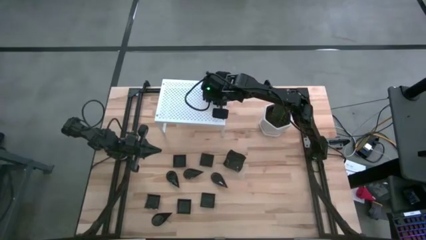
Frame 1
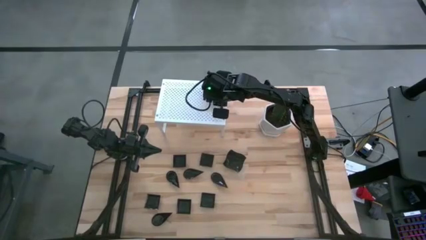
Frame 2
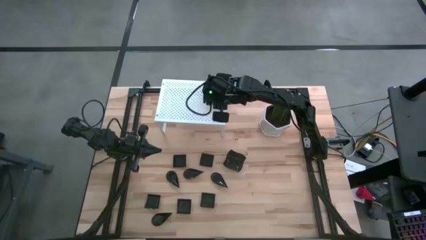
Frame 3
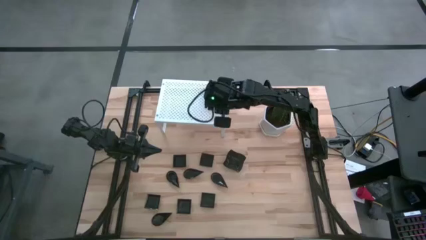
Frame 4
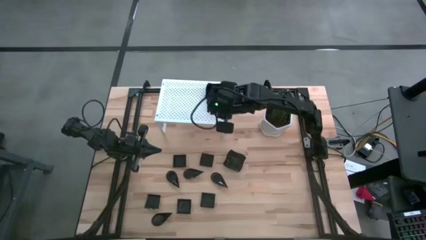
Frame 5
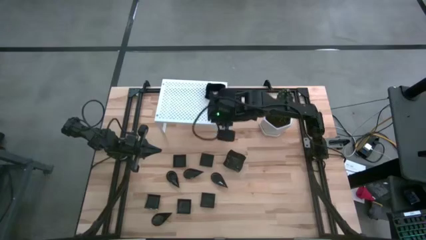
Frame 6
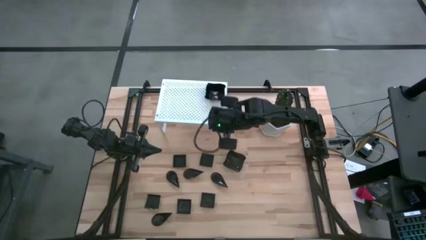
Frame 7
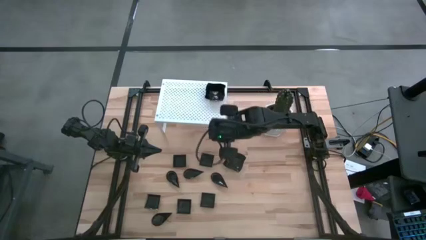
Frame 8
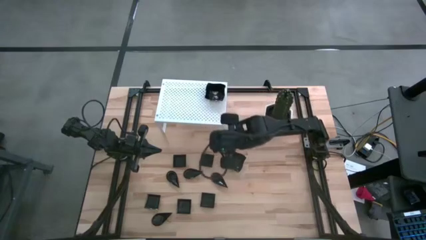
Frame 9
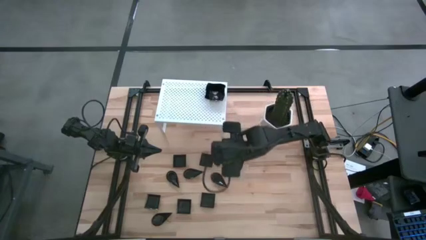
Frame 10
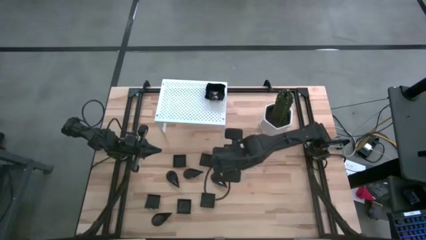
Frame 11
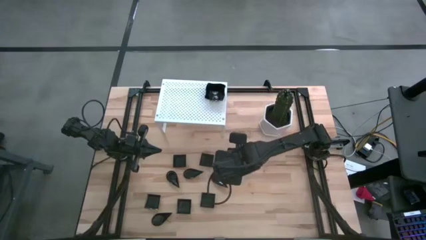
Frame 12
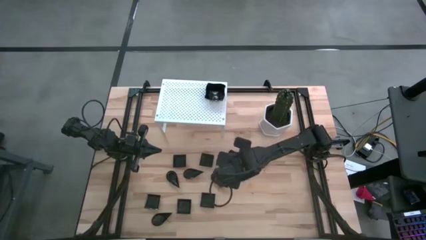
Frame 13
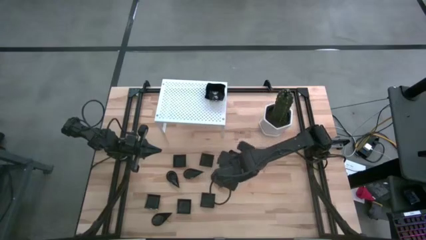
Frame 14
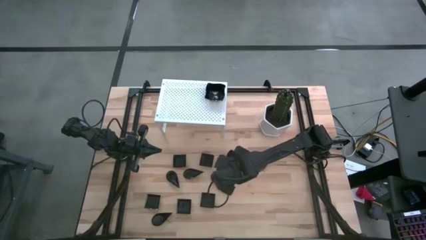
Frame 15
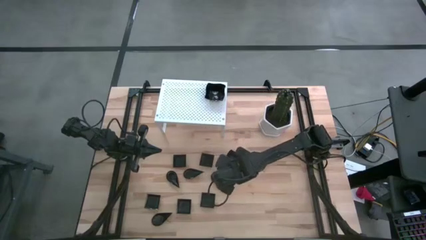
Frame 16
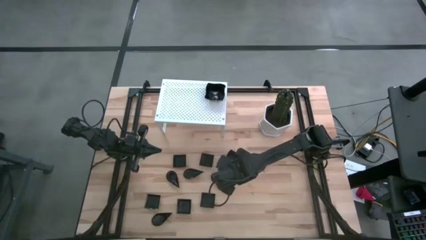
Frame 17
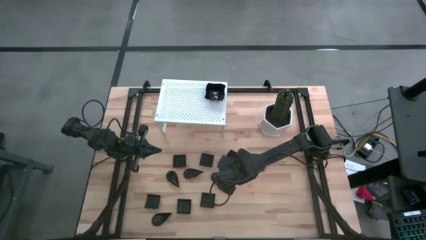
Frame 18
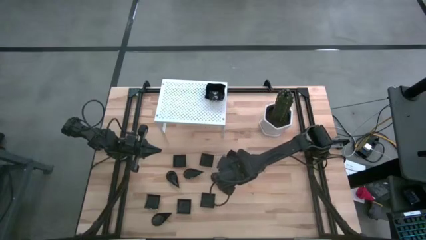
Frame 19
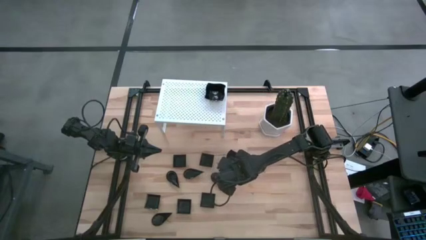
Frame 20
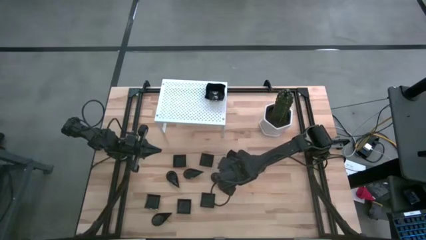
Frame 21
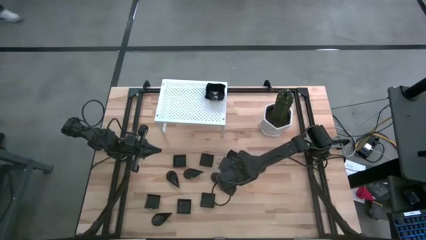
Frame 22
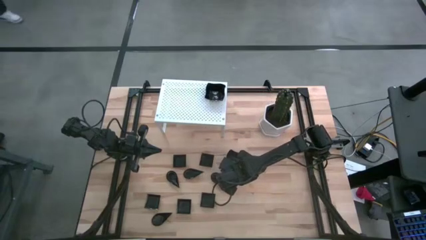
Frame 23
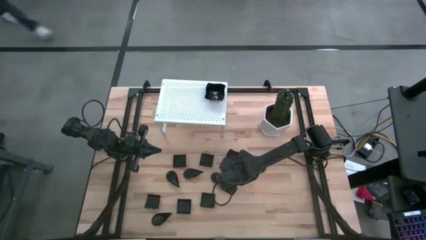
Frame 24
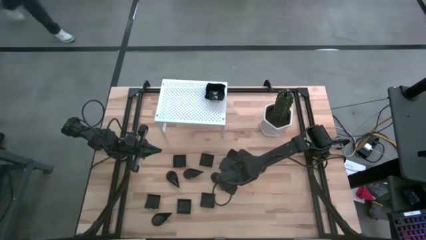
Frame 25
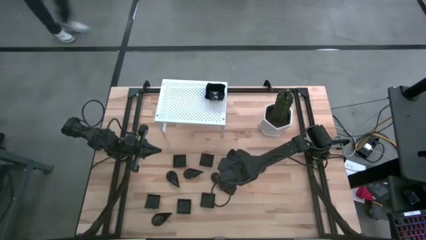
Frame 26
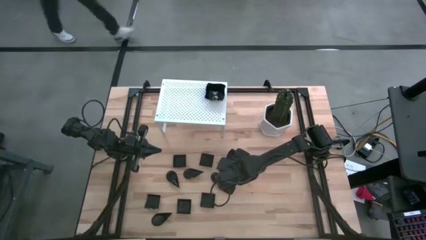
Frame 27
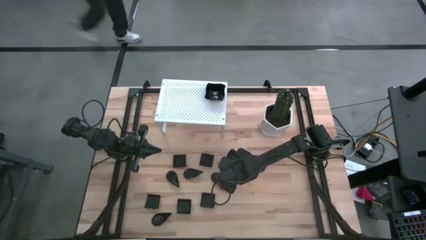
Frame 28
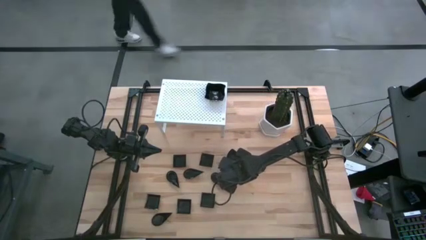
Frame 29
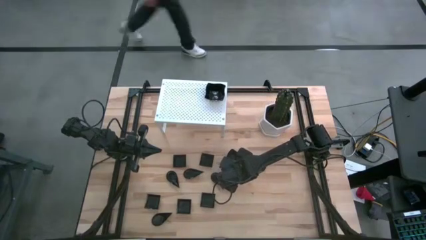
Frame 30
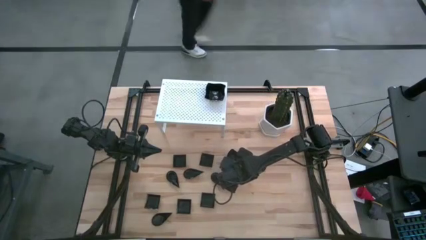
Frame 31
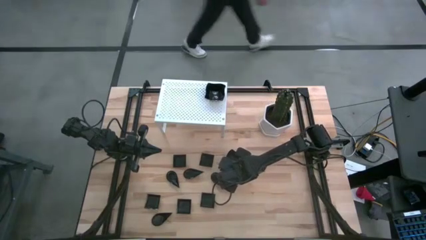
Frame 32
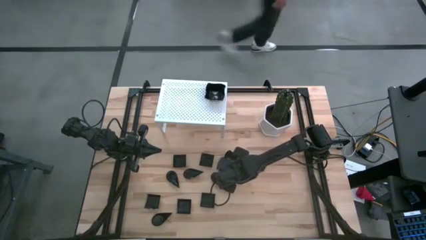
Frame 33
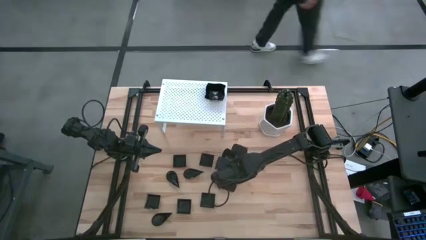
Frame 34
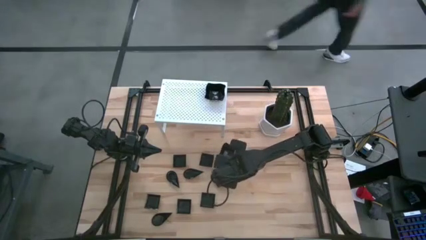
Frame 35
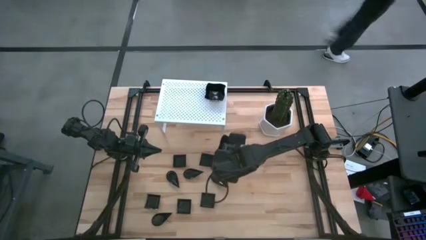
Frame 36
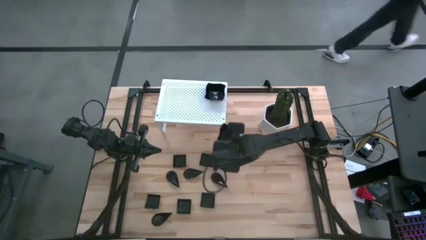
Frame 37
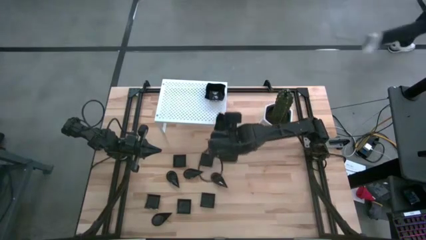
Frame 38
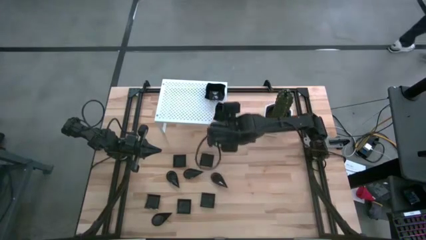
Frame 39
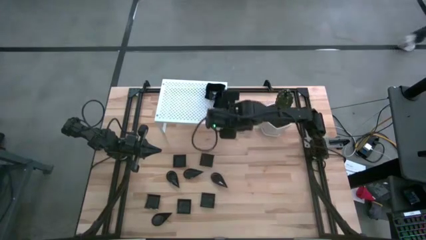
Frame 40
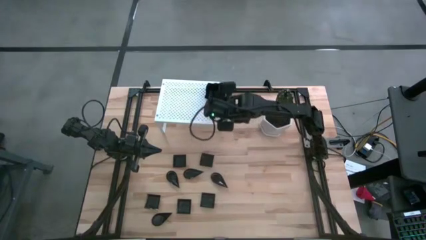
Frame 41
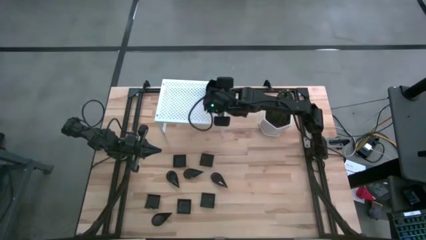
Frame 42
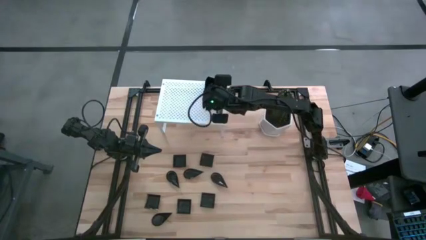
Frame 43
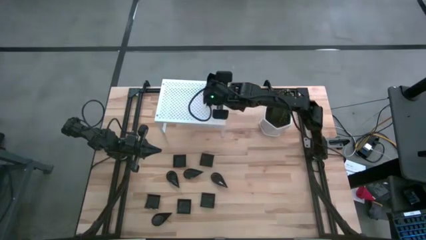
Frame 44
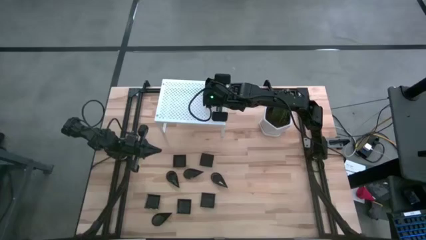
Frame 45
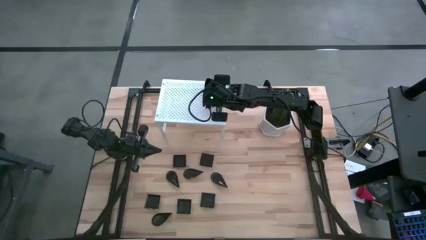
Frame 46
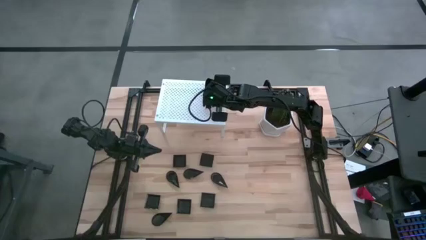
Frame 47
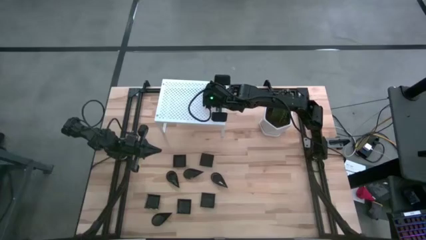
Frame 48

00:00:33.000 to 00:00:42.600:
Task: Pick & Place Mini shaped plates
Stack the distorted square plate on top of the other distorted square plates on the shelf

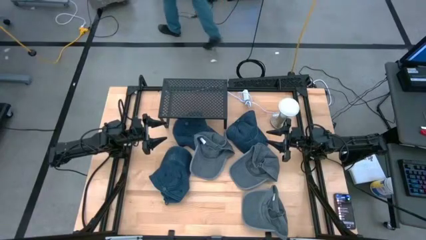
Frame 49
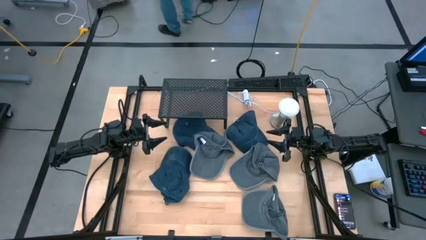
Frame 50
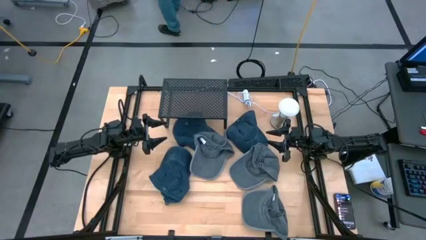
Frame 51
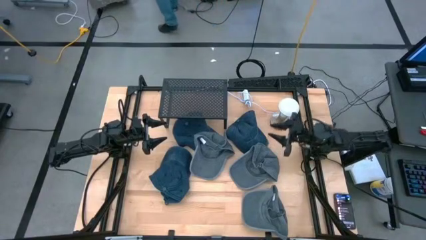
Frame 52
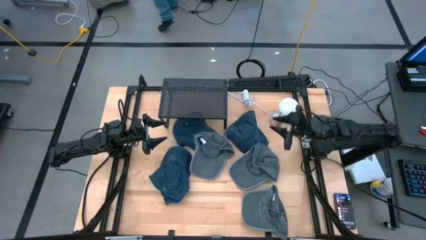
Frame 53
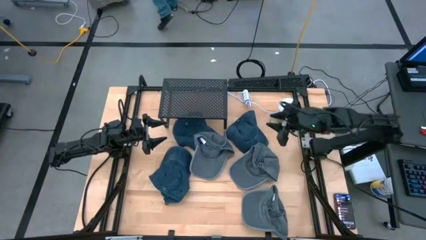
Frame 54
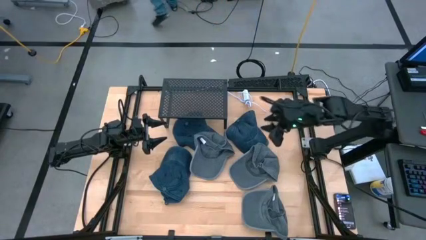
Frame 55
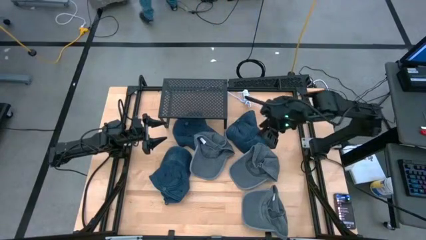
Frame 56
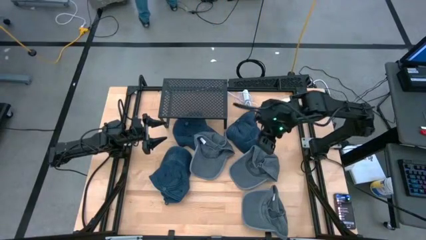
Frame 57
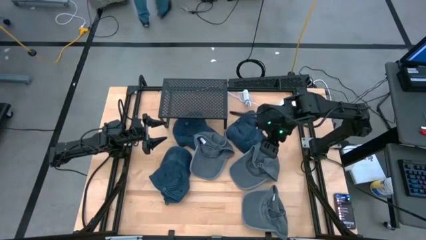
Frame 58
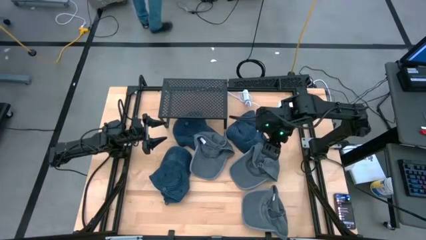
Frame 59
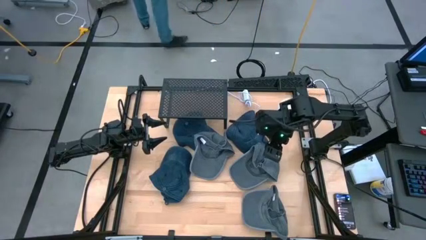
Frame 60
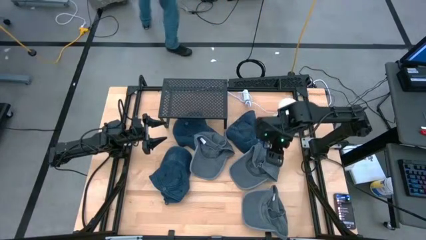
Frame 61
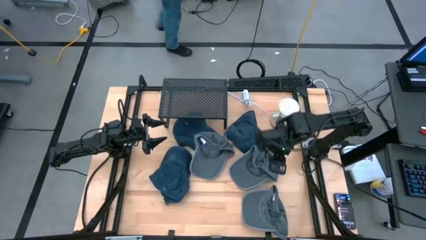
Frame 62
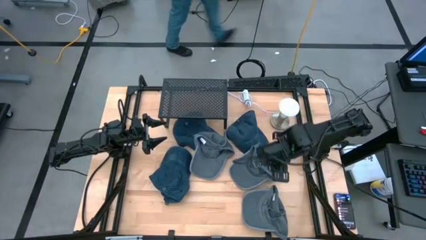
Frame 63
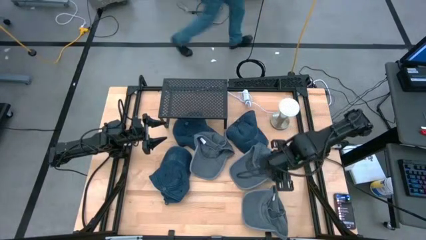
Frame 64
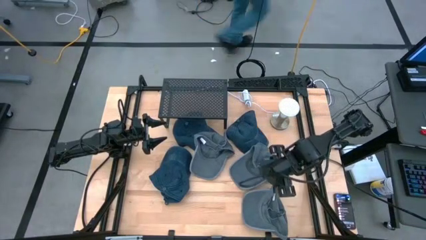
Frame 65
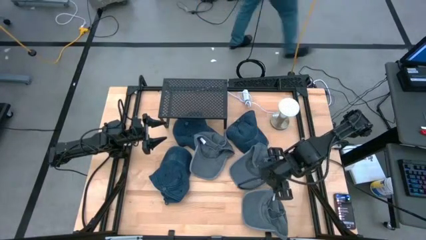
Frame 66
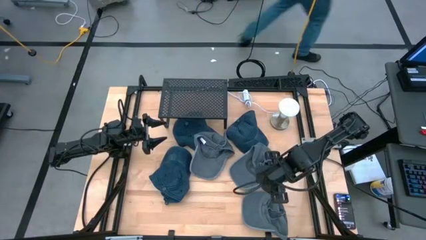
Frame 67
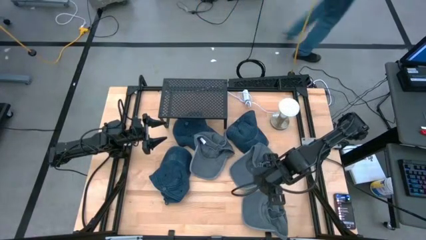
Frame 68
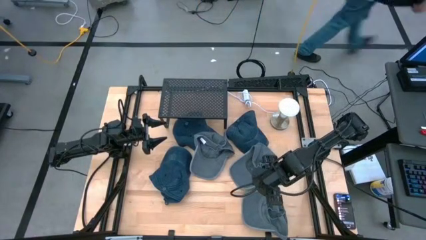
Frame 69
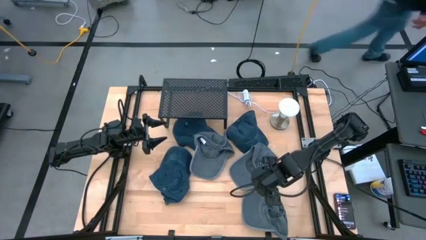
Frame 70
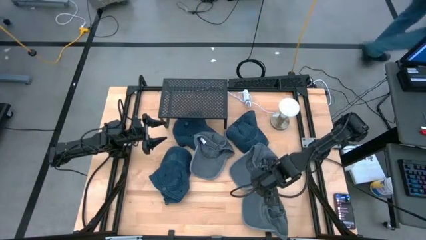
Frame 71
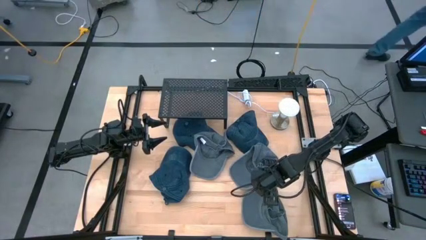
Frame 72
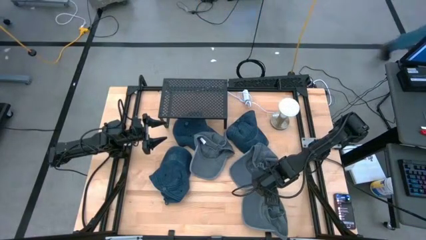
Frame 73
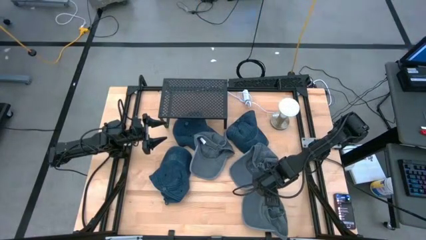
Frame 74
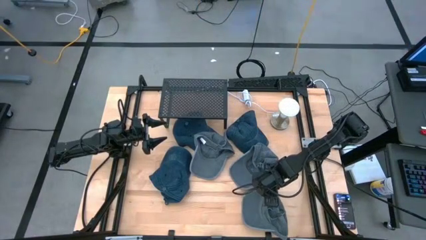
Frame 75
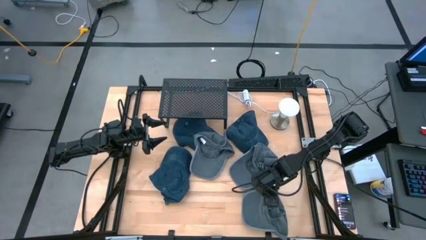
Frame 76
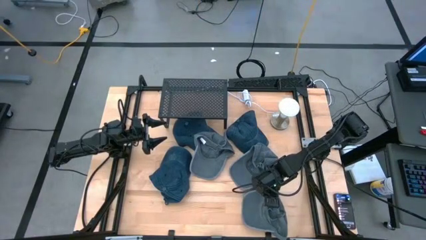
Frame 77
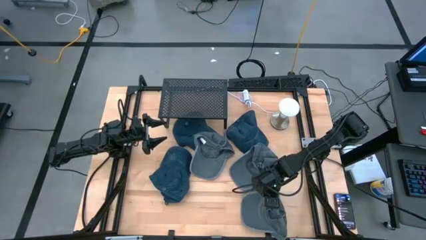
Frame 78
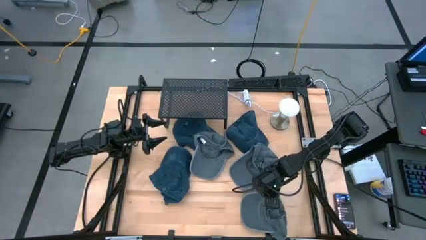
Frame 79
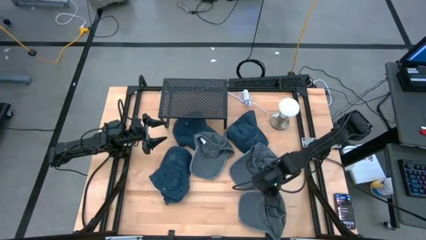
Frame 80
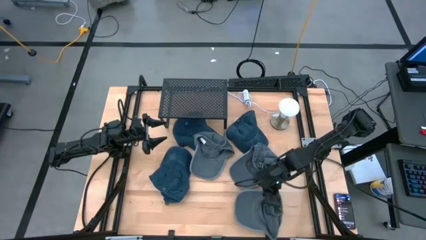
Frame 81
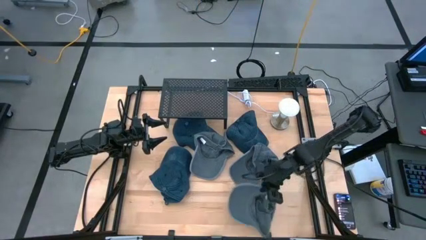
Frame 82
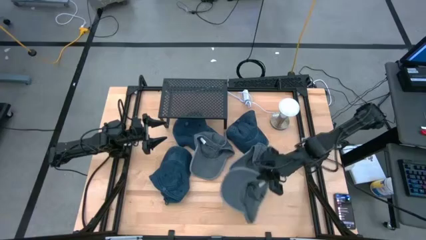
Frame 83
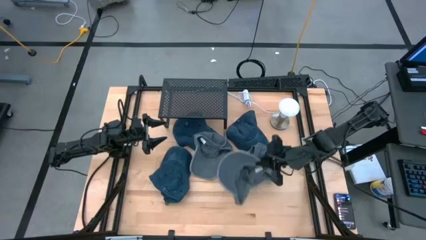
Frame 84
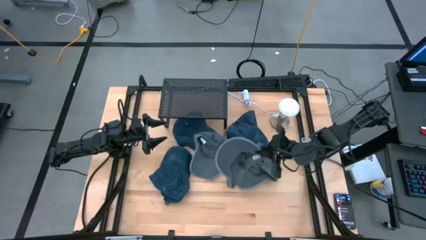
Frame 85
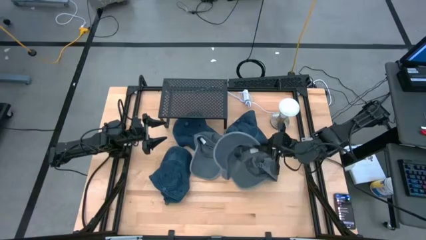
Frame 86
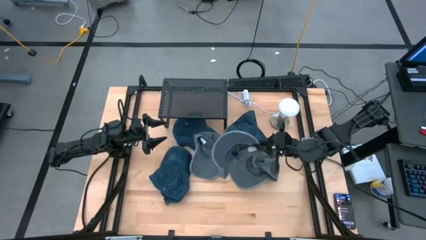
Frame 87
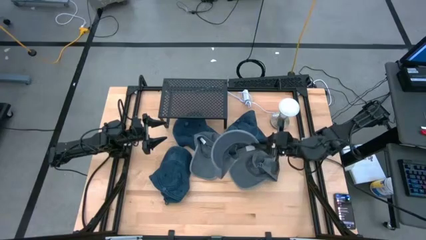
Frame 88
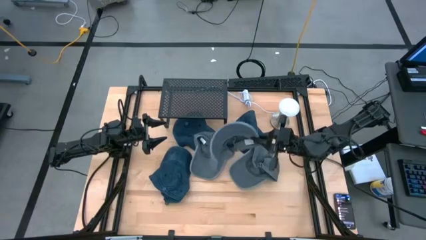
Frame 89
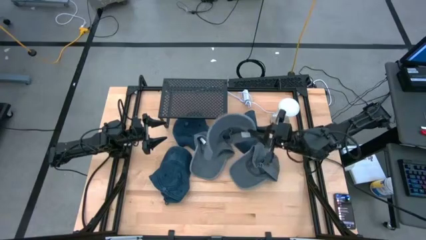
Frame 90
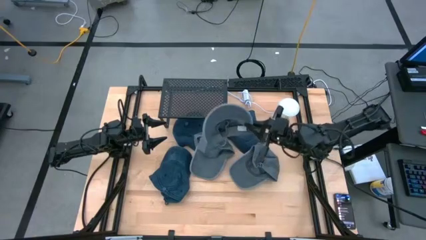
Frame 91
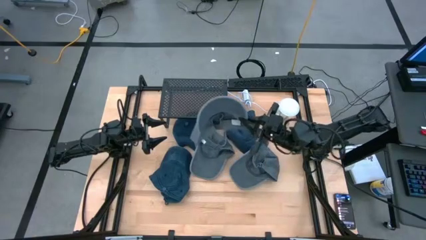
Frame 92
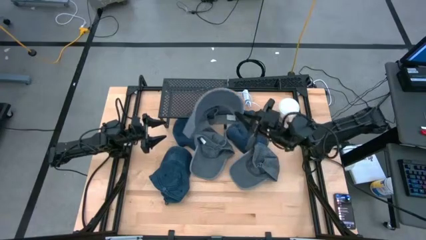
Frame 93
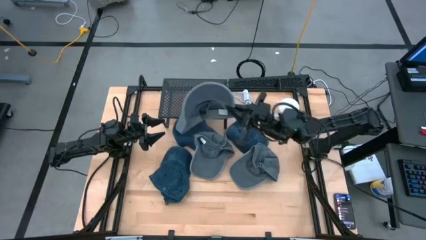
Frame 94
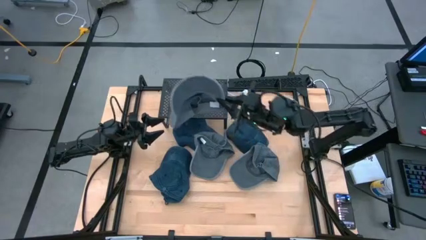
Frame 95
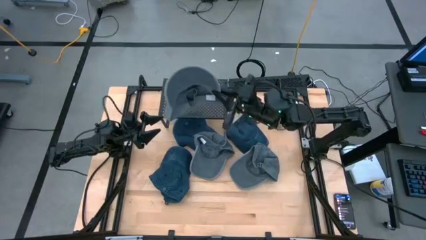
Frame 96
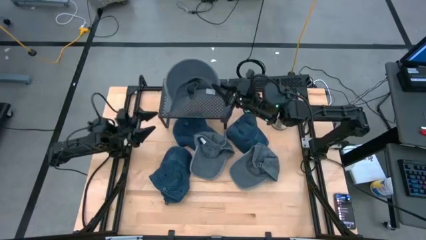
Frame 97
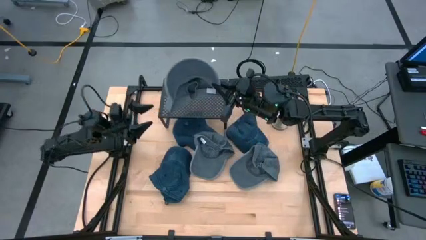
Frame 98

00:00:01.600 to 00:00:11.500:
Task: Pick & Place hat
Put the bottom dark gray cap on the right side of the shelf
